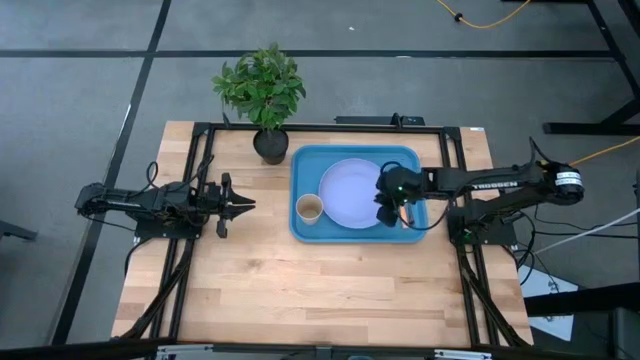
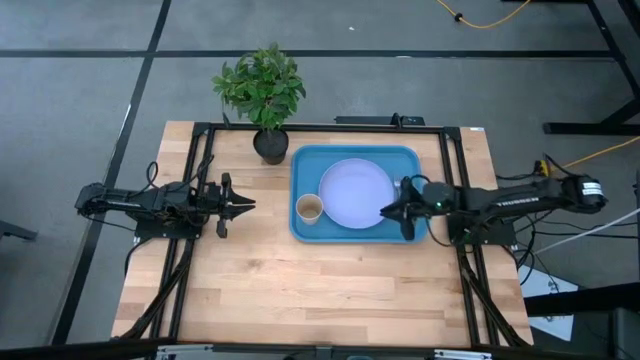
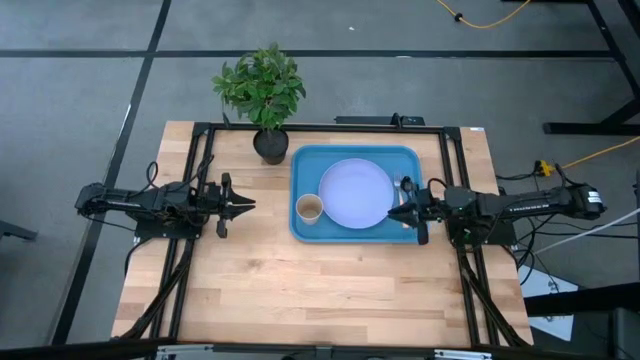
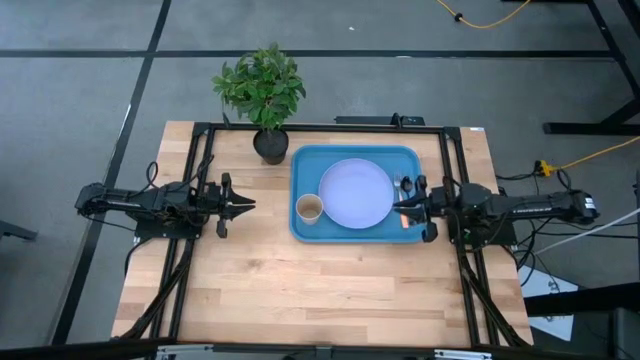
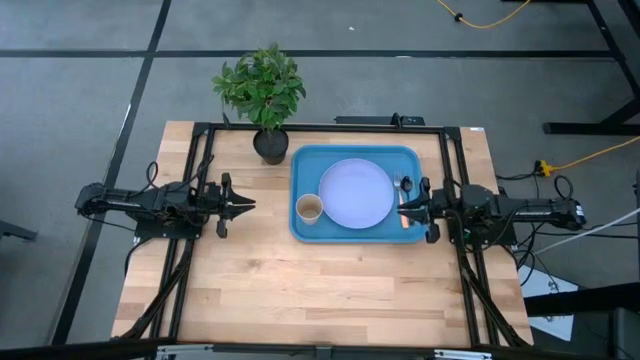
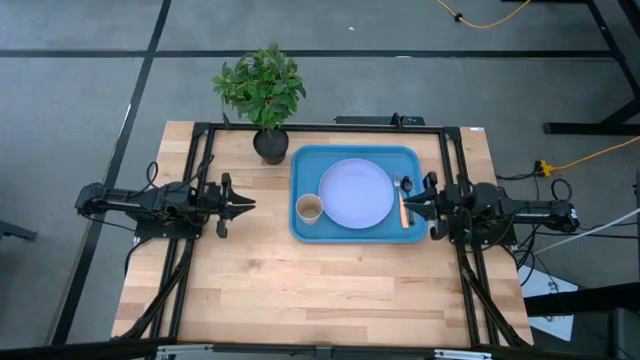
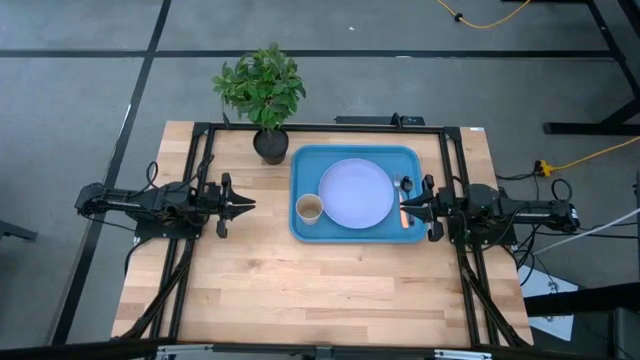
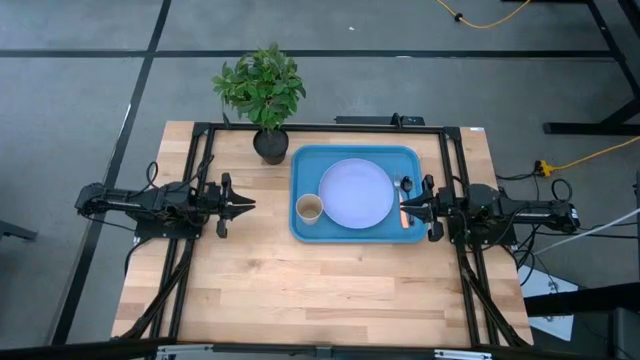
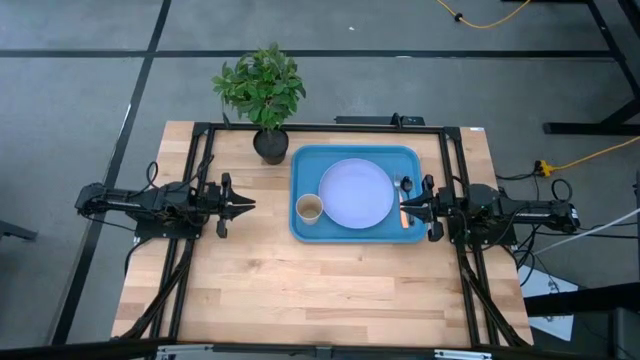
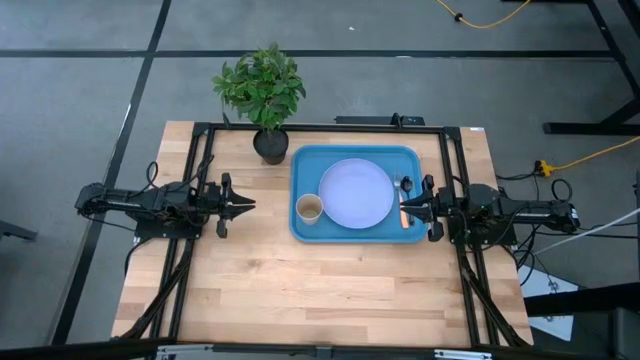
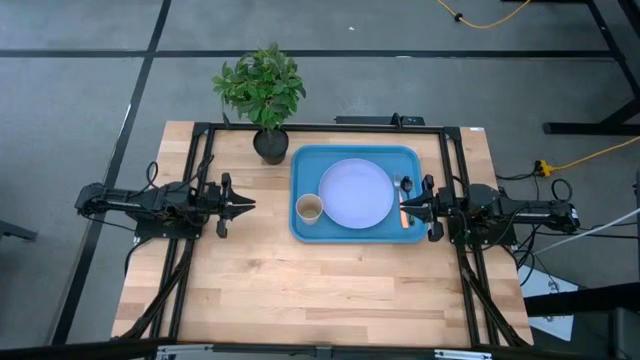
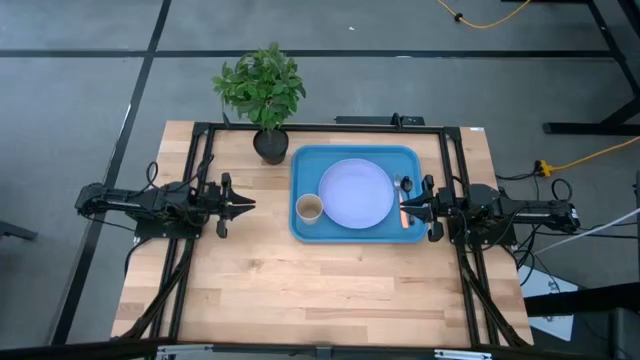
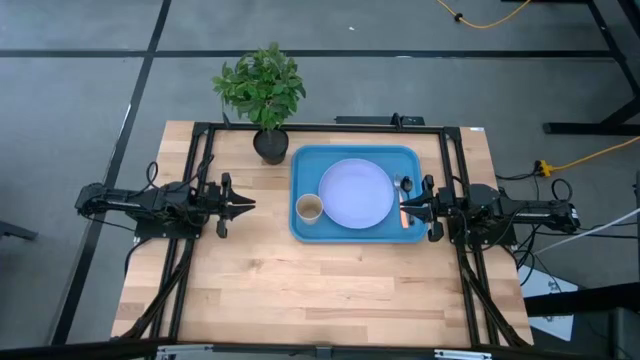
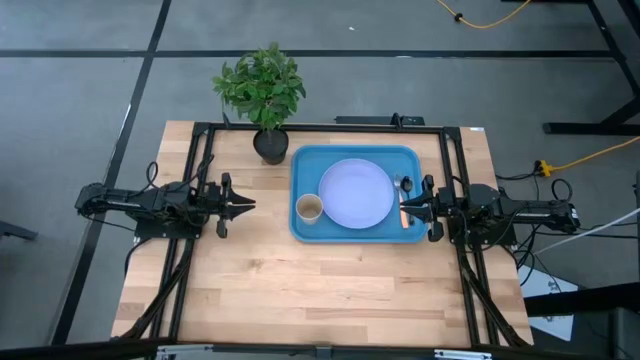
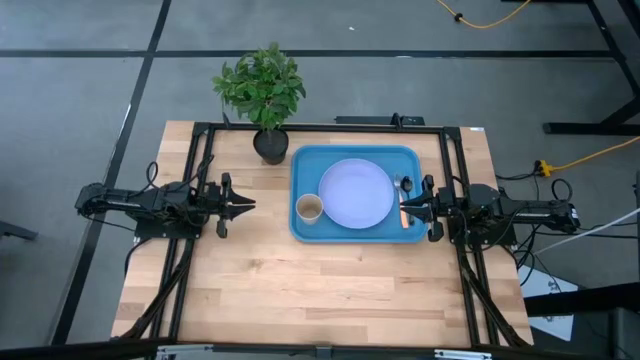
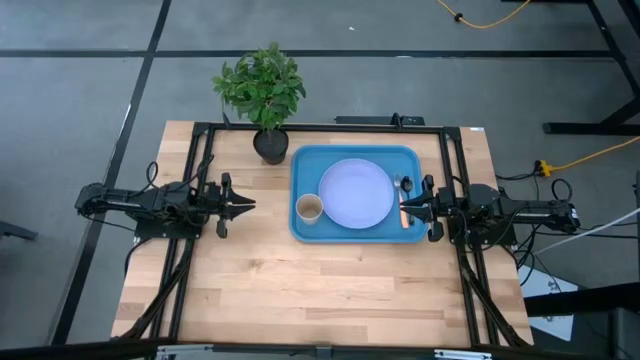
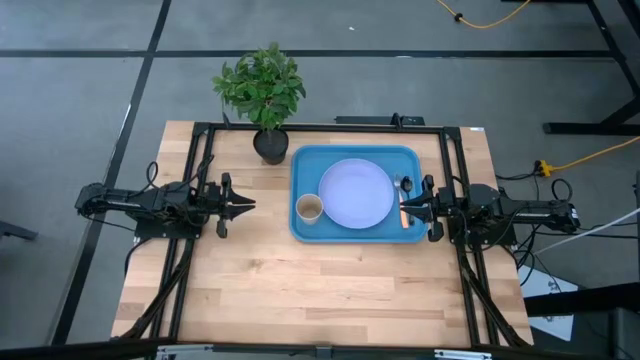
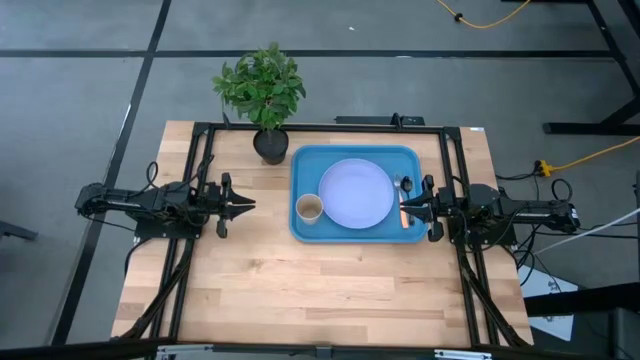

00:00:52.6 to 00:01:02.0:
Task: Pick and place plate/cup/fork/spoon on tray
Return to Home Position

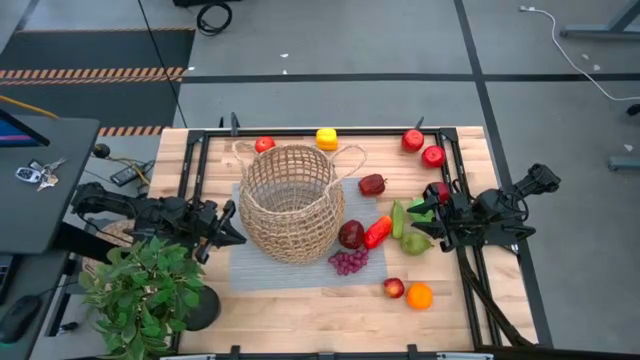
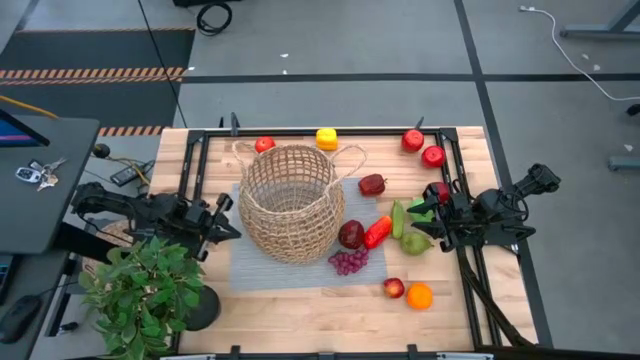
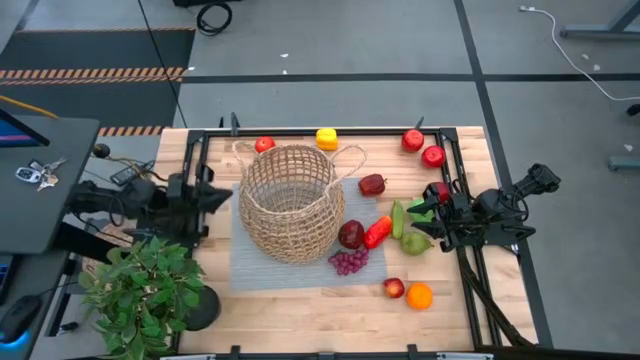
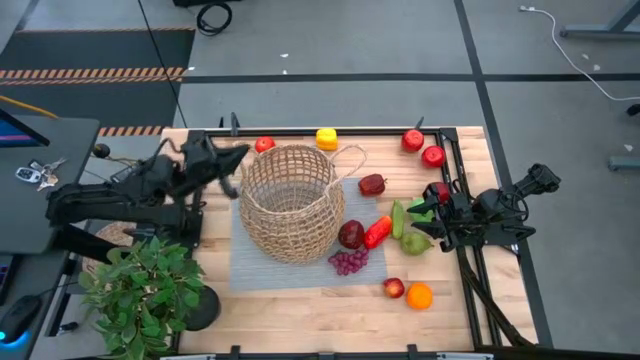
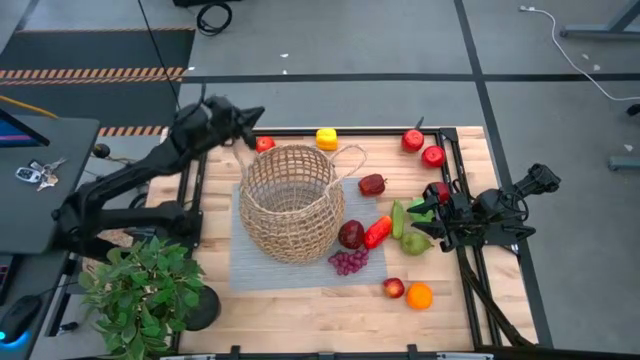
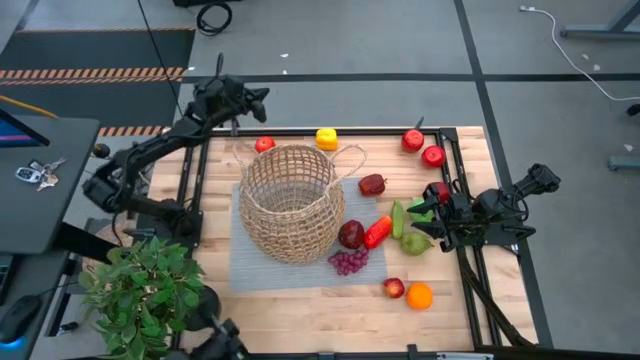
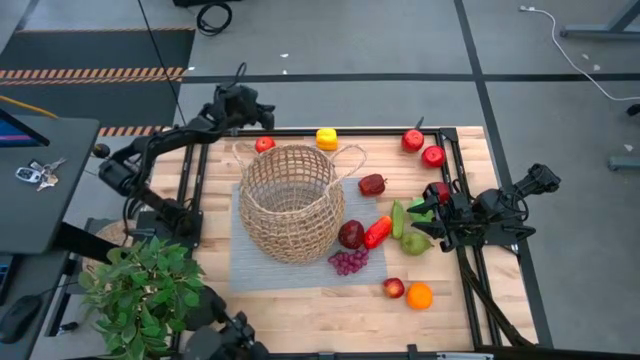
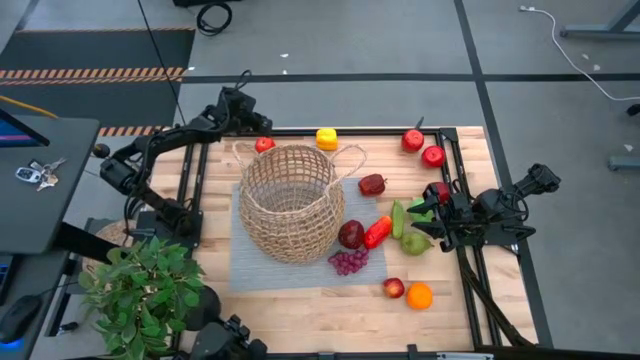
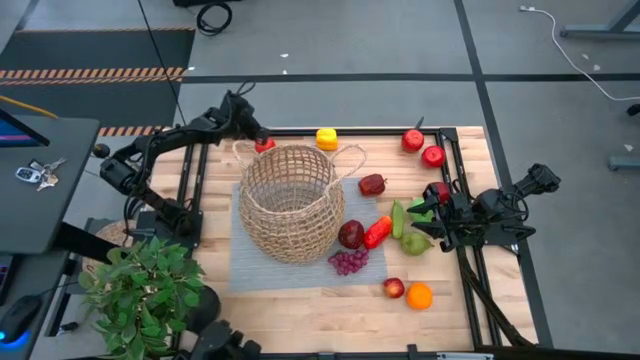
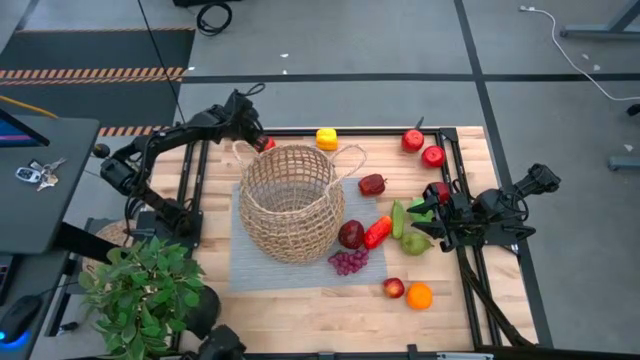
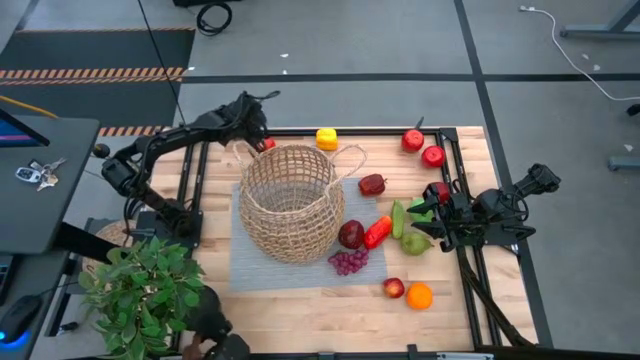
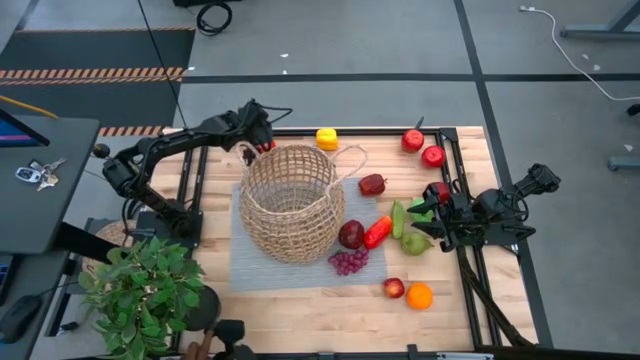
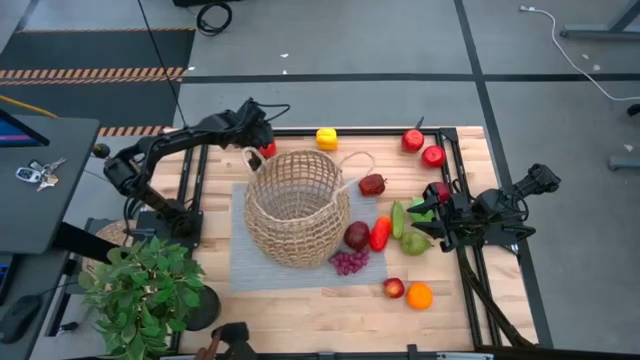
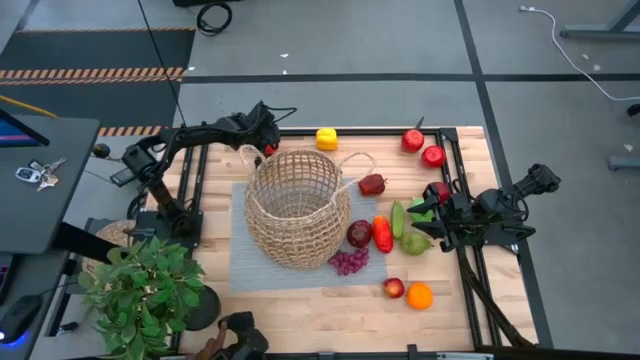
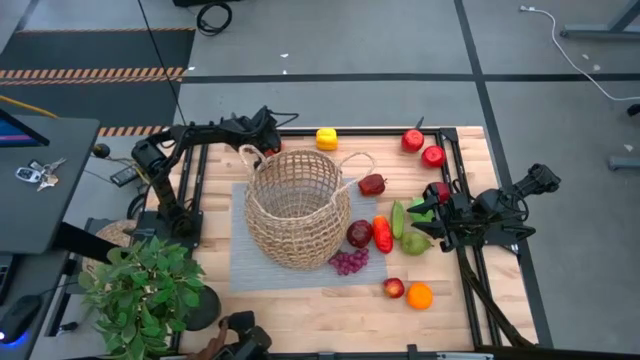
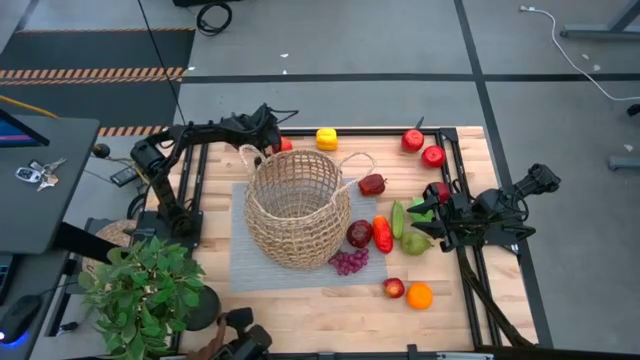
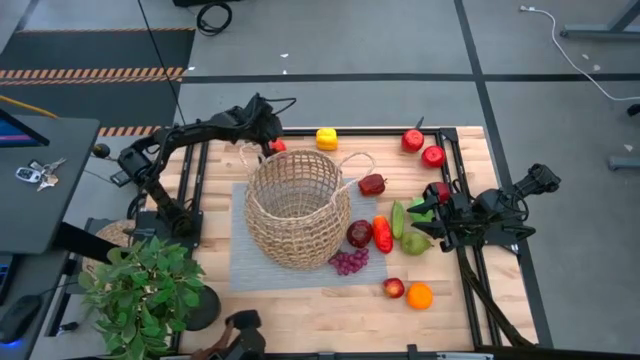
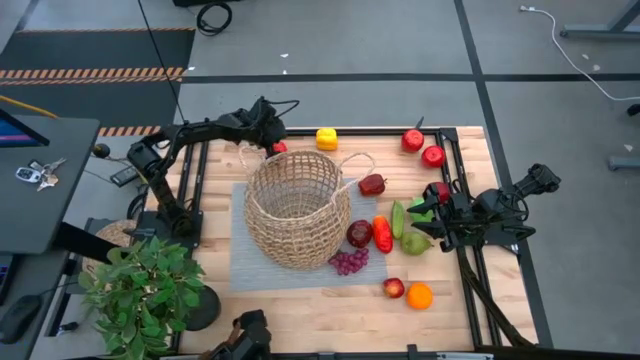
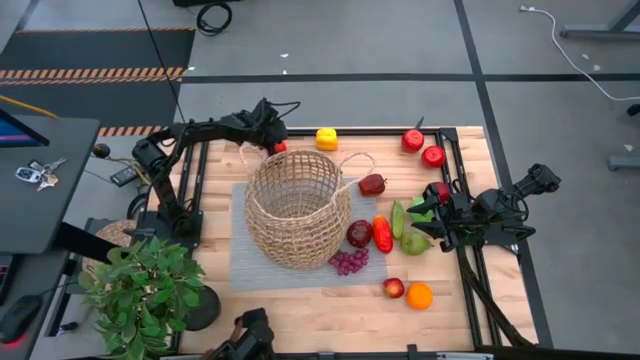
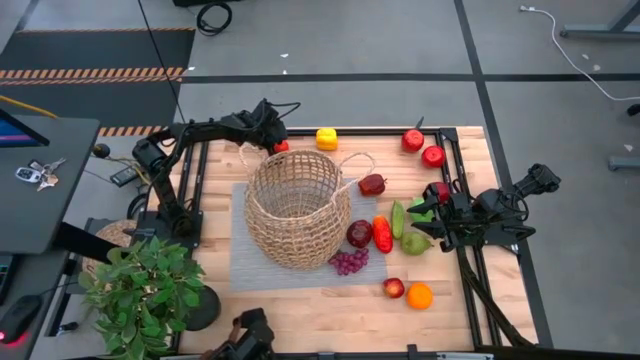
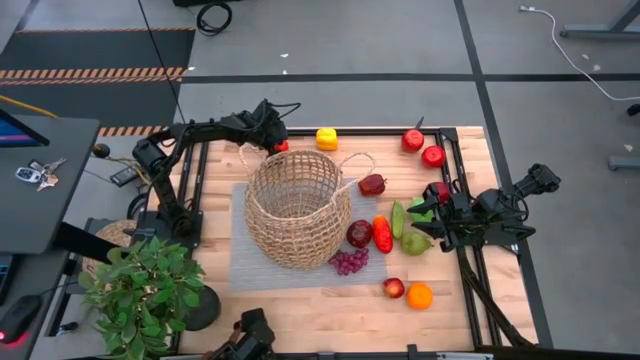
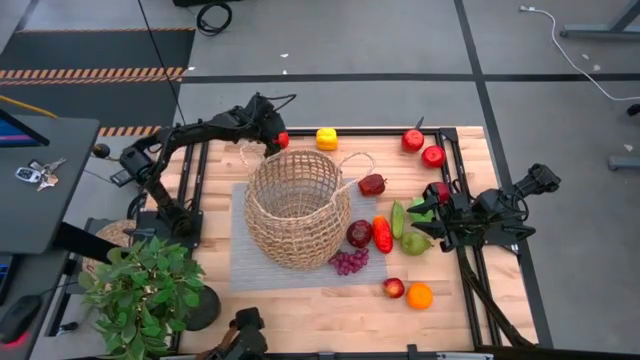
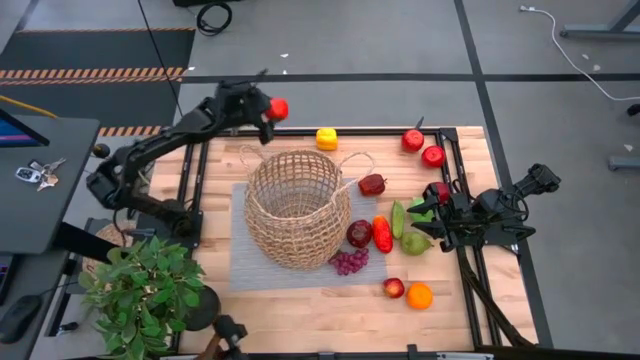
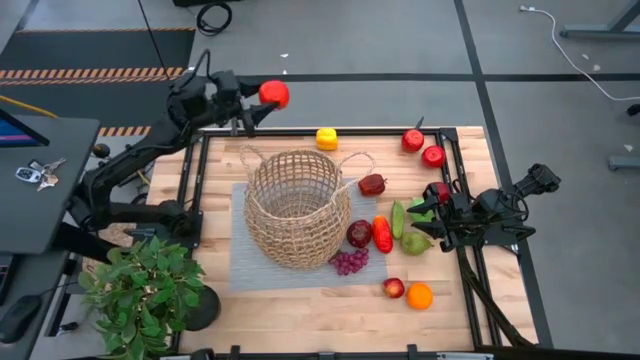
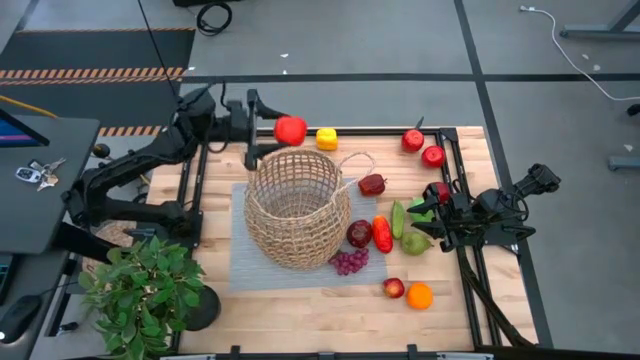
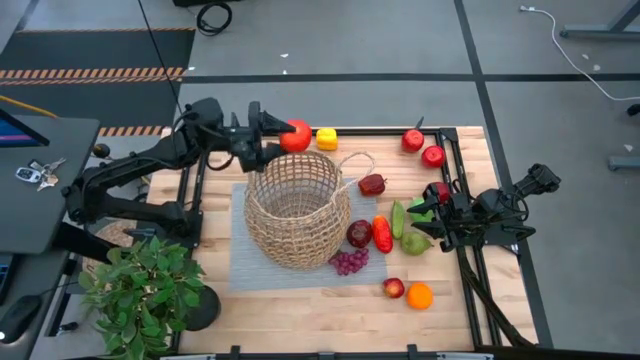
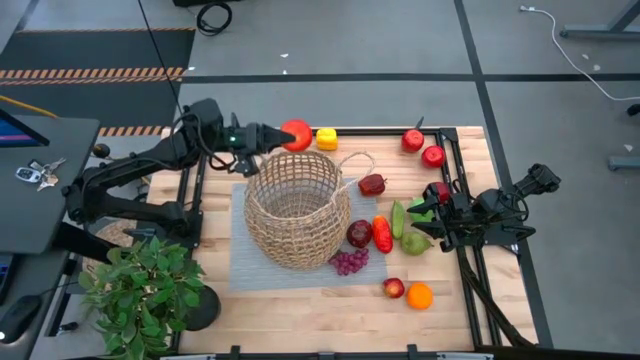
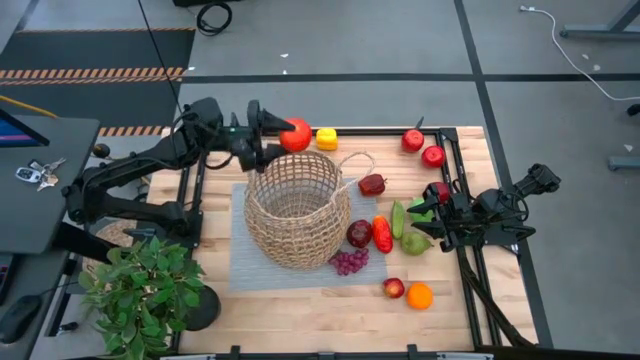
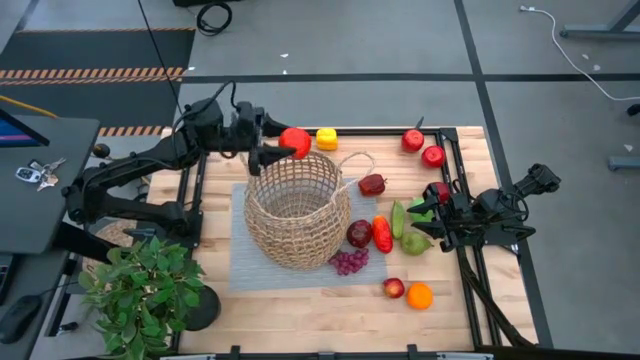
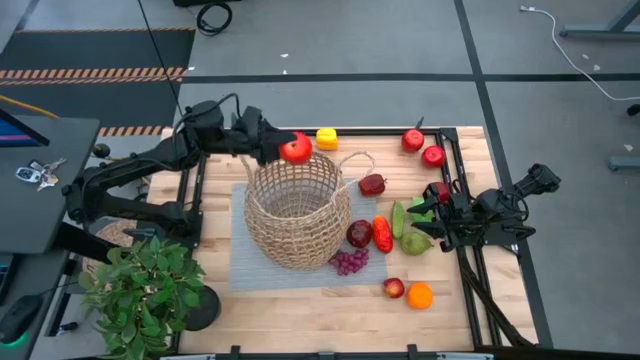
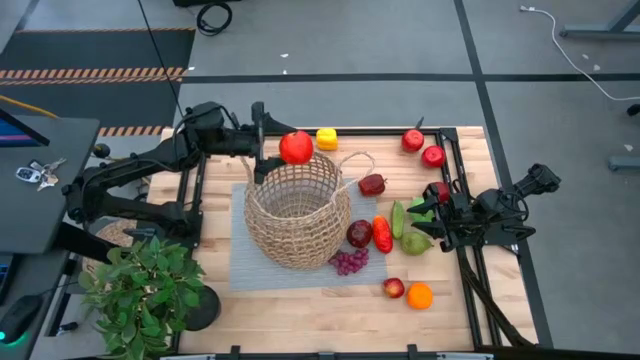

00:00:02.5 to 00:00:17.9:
Task: Build produce basket
Put the red apple into the brown basket
